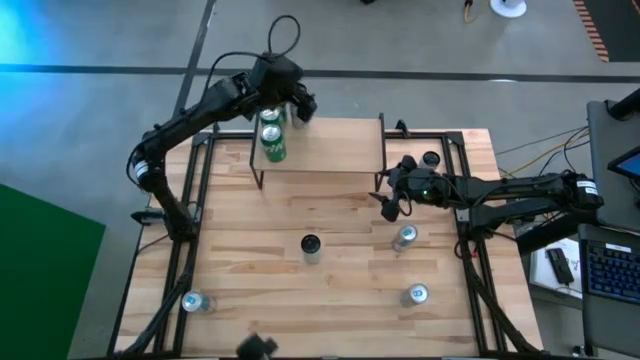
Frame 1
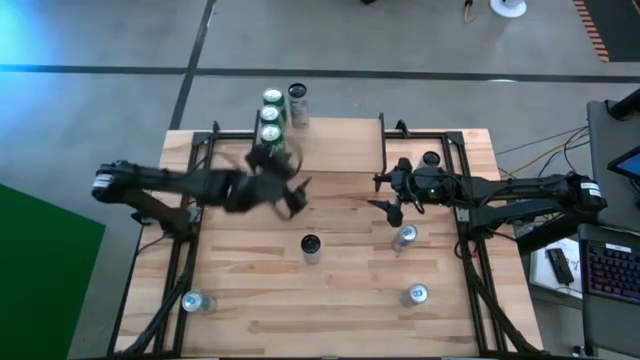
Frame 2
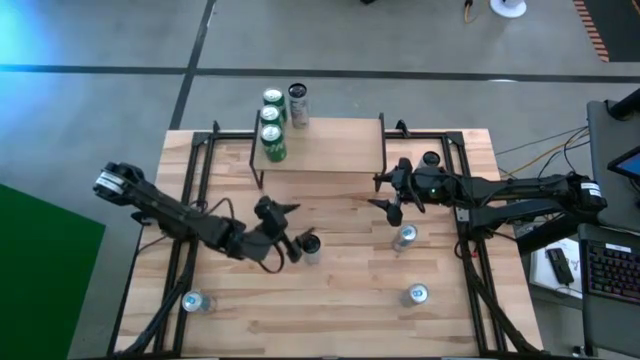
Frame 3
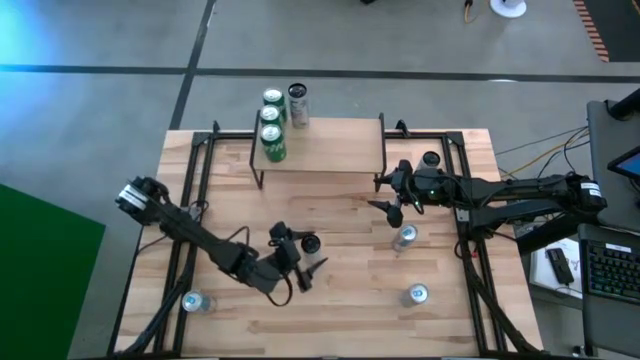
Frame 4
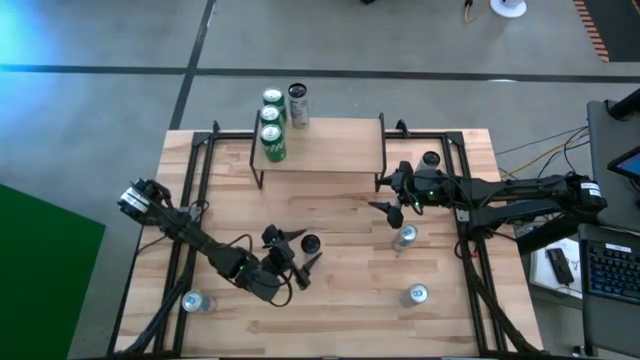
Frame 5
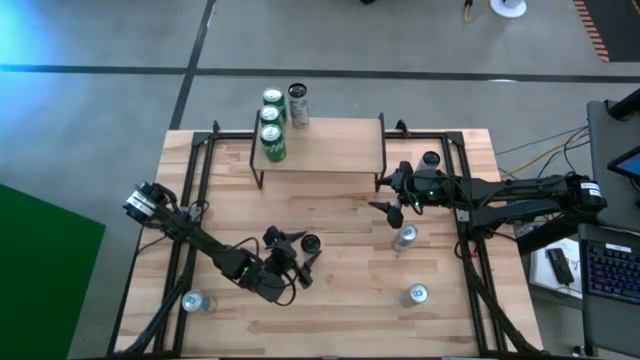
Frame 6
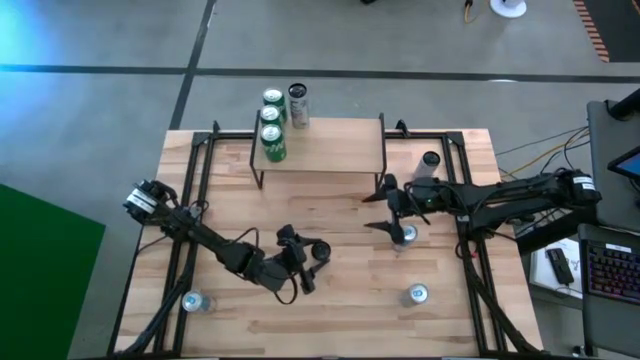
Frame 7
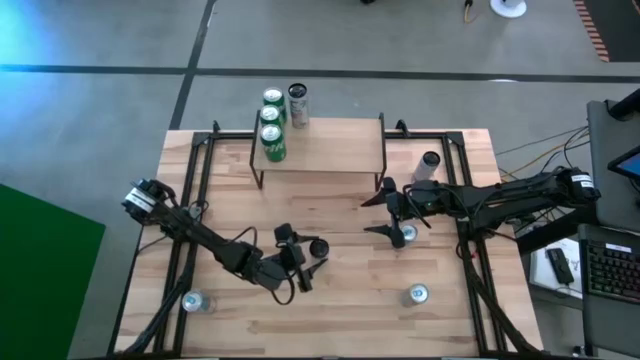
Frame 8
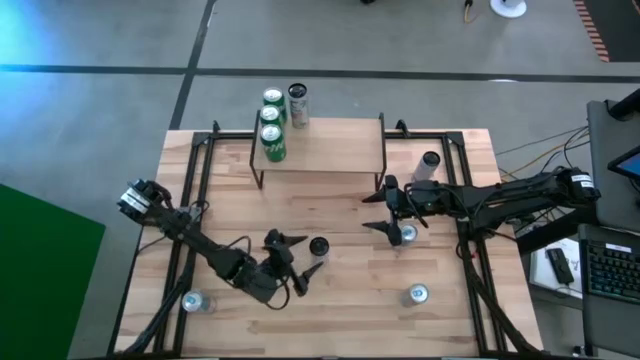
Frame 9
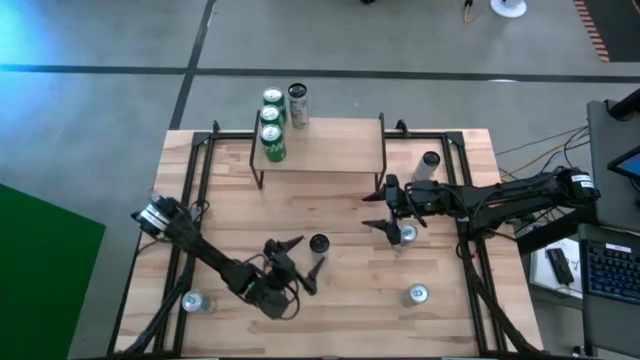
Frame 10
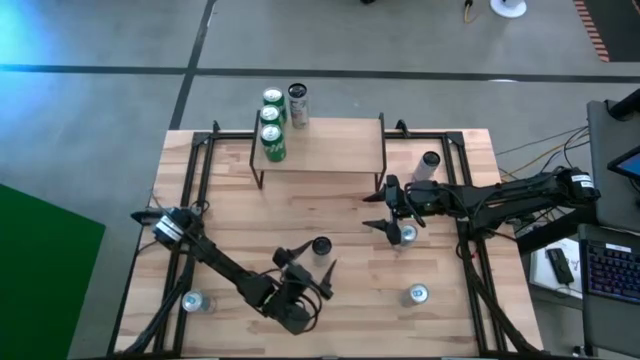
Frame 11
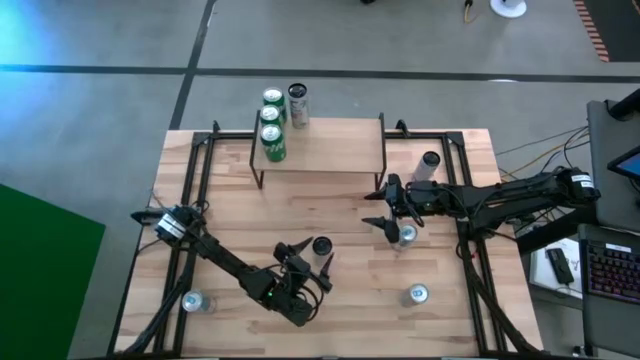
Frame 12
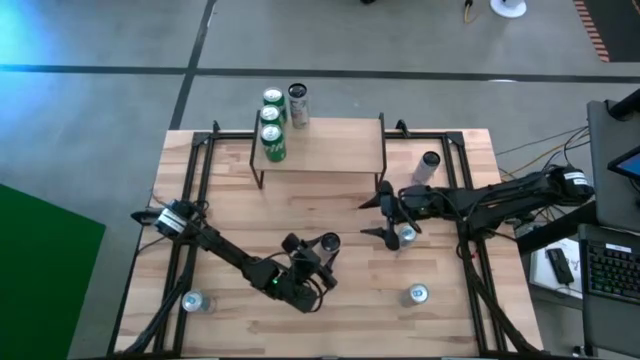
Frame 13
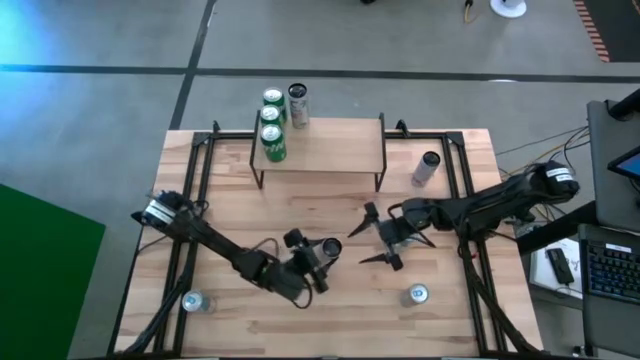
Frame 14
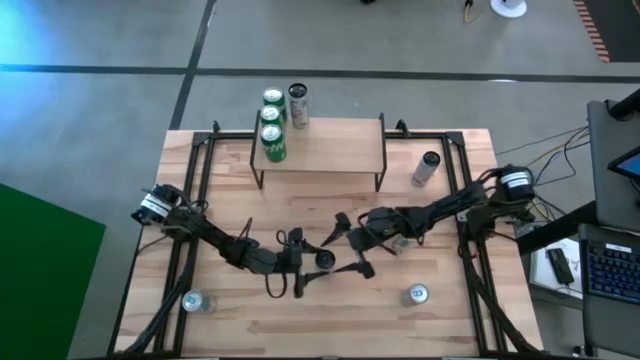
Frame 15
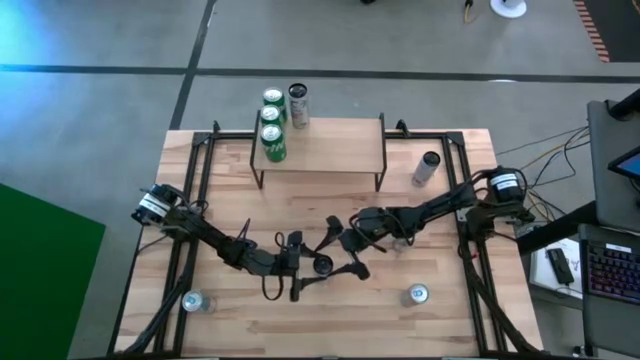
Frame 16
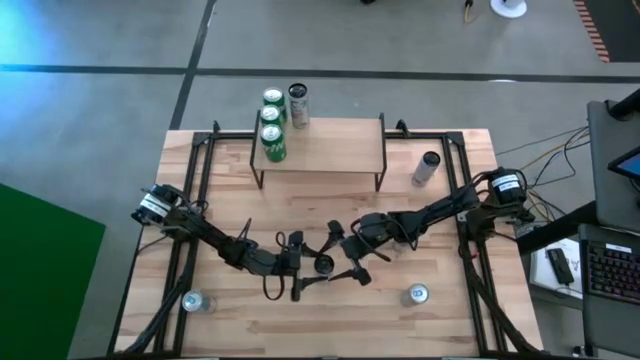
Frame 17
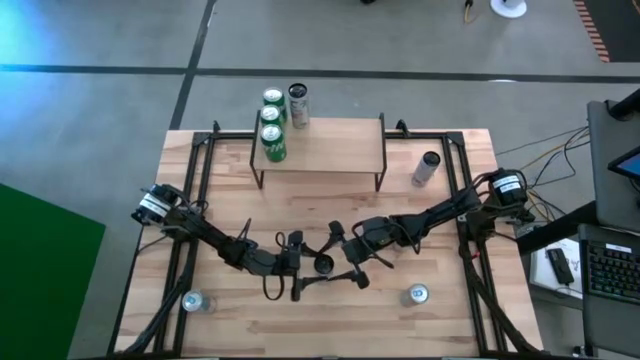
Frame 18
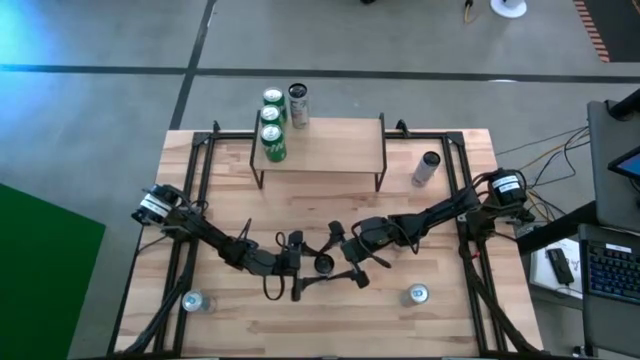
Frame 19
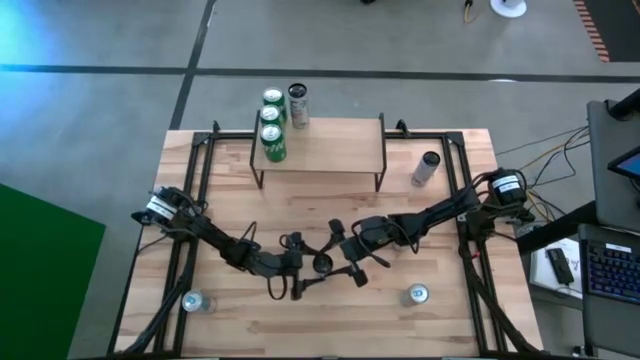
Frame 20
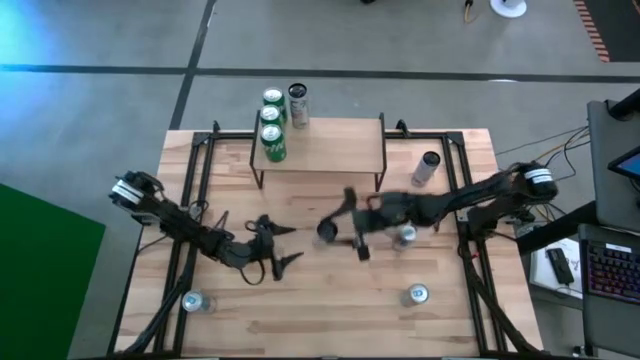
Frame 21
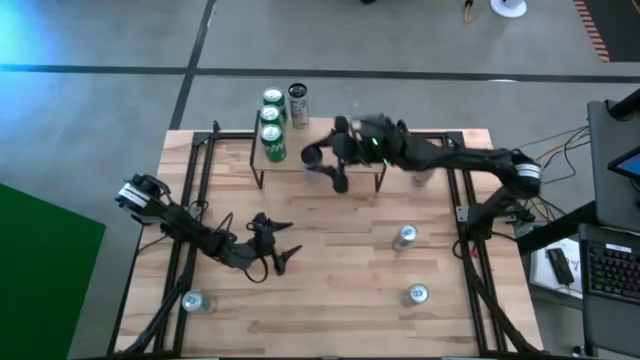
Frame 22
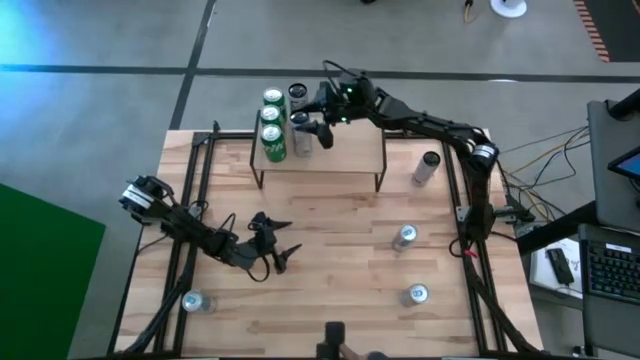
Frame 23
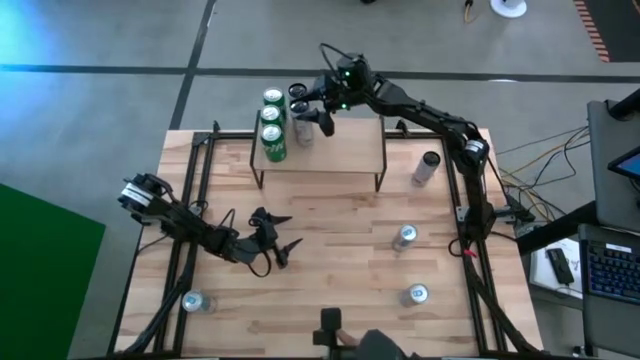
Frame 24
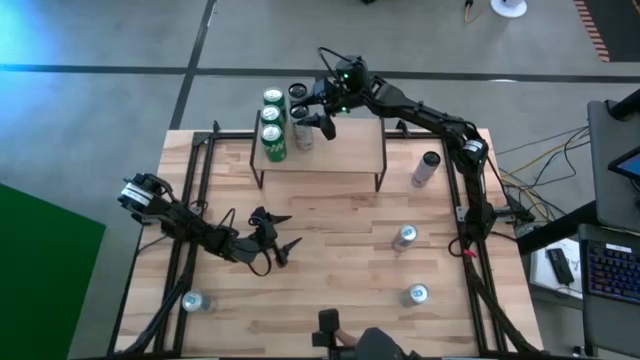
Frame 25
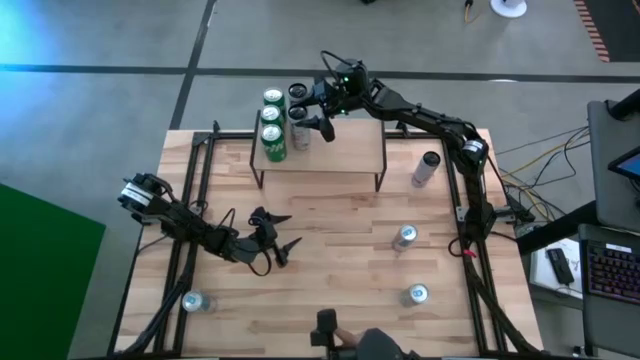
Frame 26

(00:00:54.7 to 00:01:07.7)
Task: Place canned beverage on shelf
Put the bottom white soda can on the shelf aligned with other white soda cans

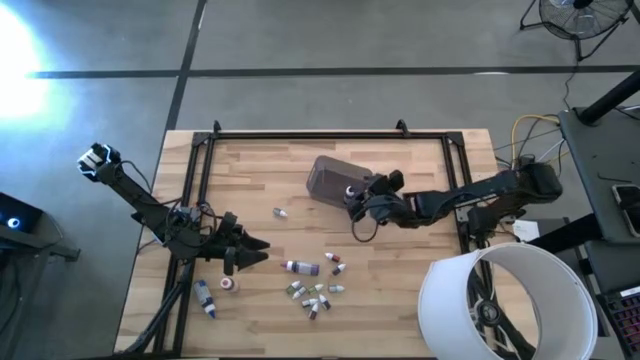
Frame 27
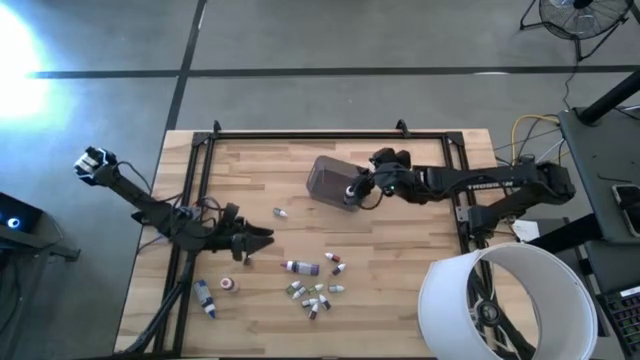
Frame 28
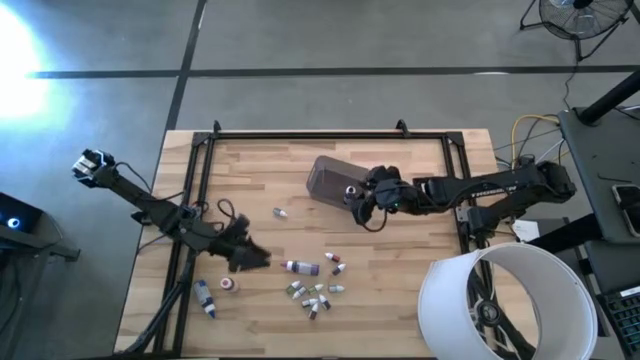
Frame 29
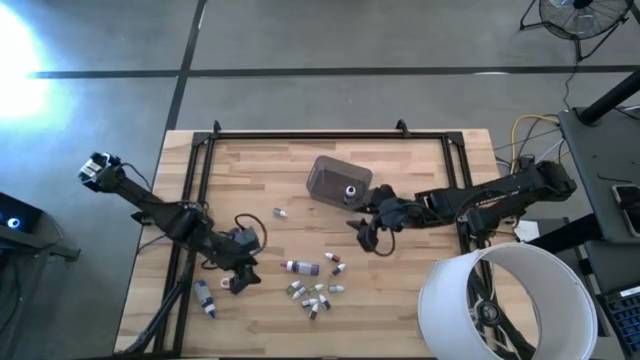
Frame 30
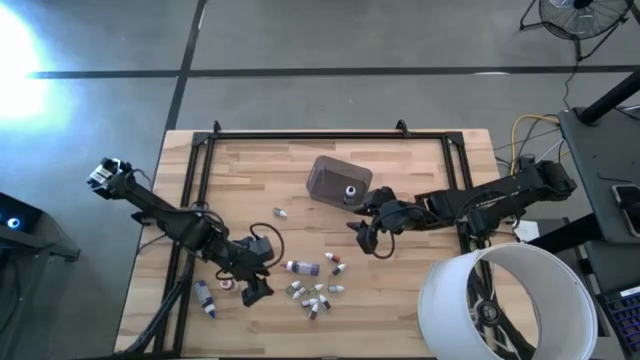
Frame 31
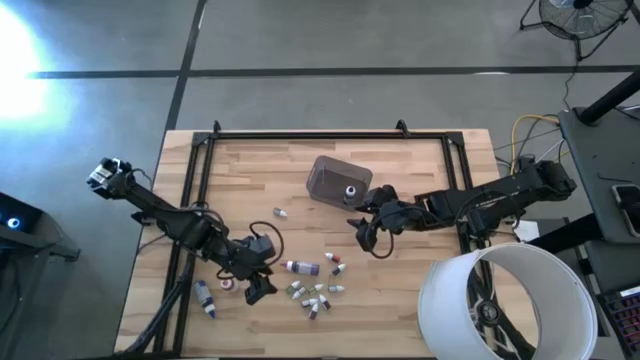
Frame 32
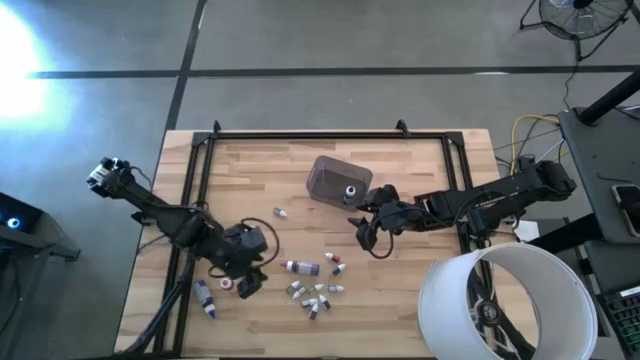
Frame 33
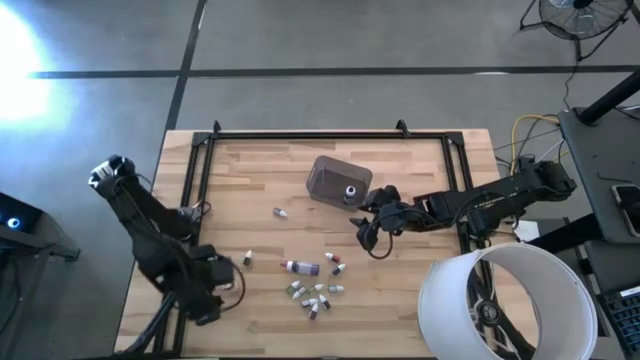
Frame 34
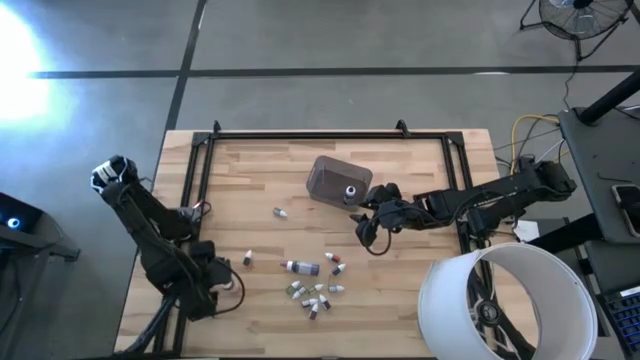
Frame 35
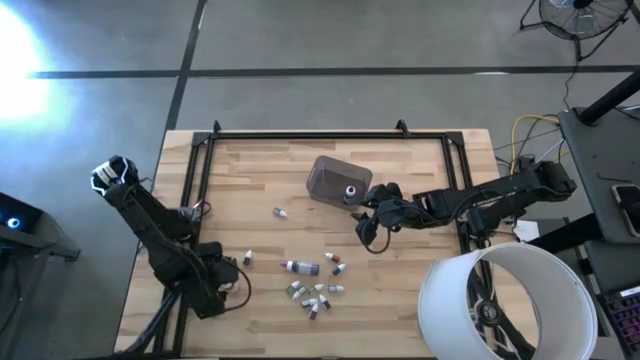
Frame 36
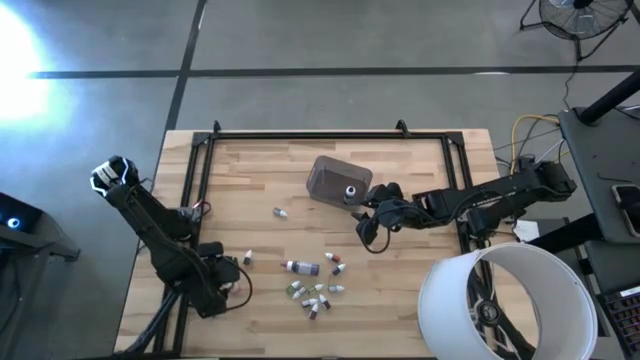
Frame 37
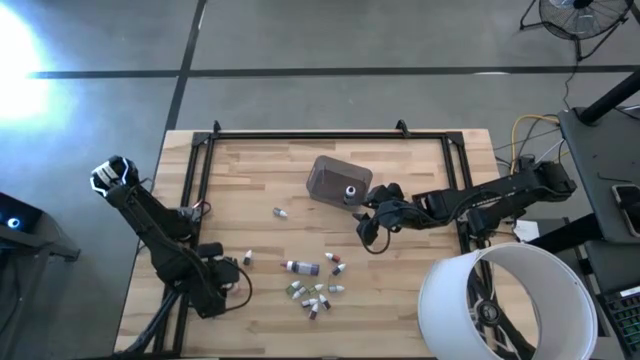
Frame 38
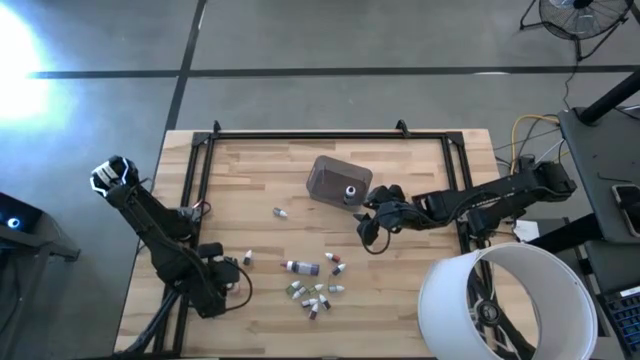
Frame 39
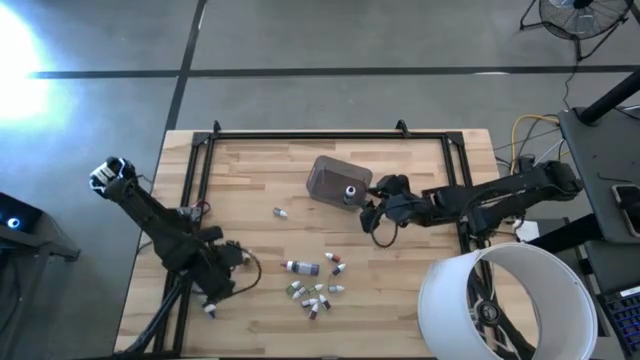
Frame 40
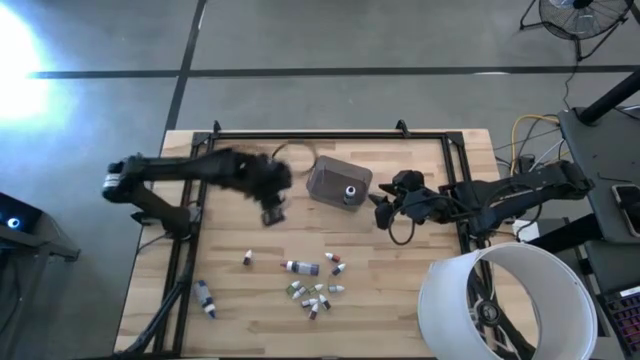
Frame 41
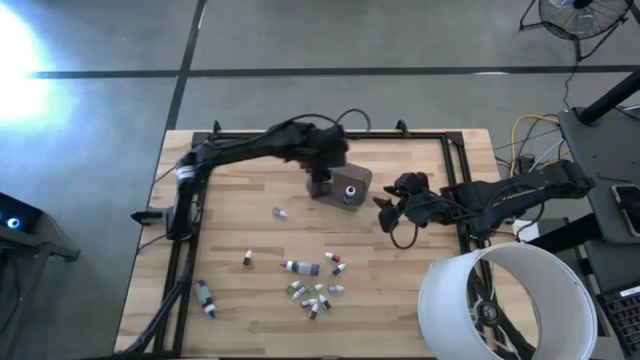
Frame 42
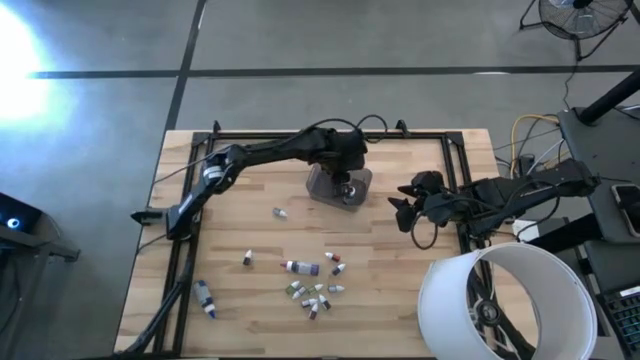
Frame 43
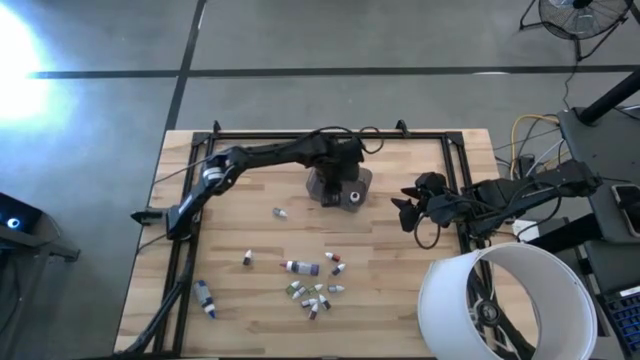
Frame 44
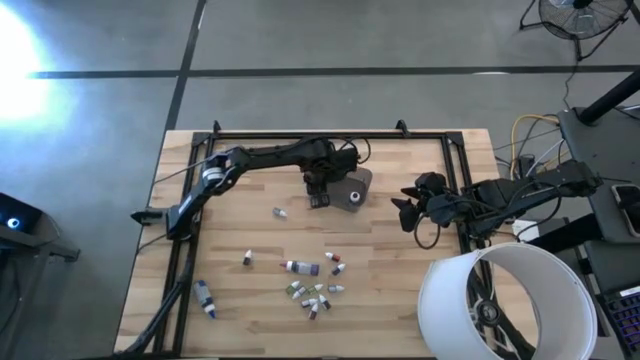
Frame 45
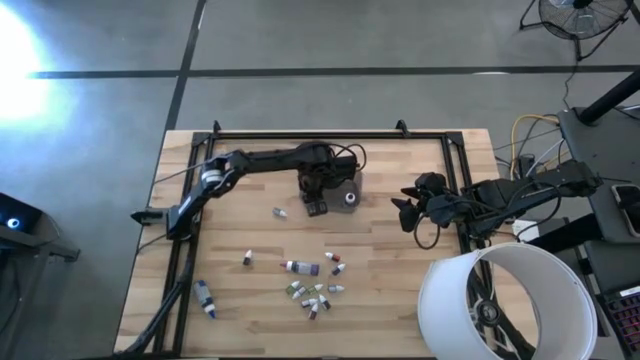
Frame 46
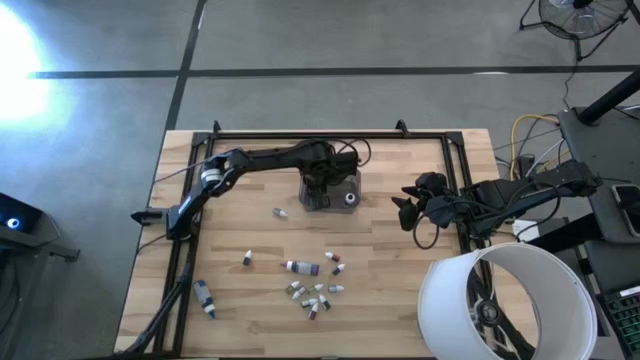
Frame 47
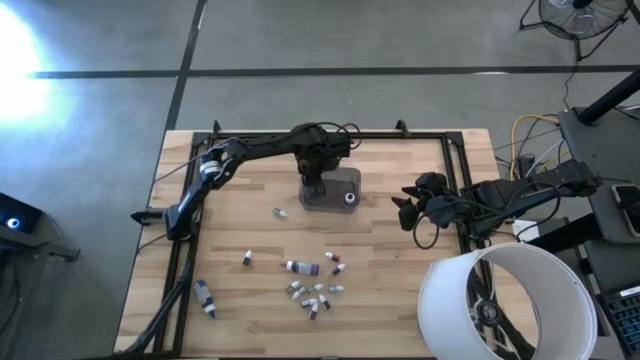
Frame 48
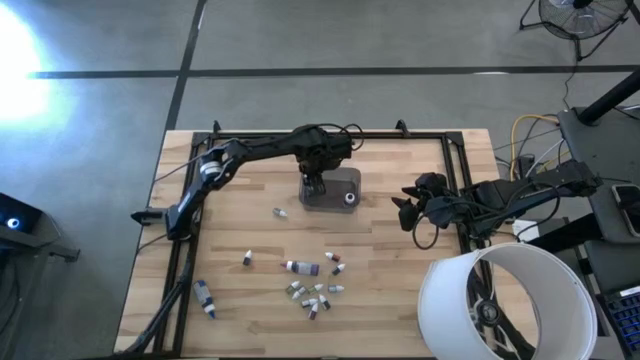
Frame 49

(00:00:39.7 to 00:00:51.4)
Task: Pick & Place food coloring
Put the large pink food coloring bottle into the black bin
